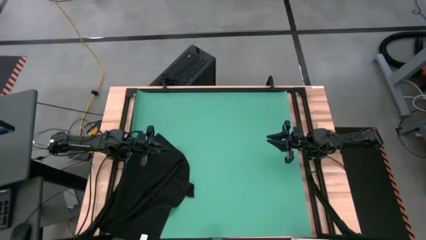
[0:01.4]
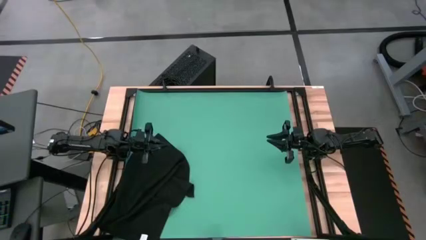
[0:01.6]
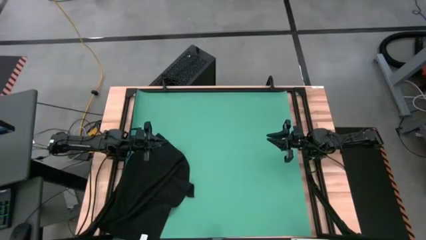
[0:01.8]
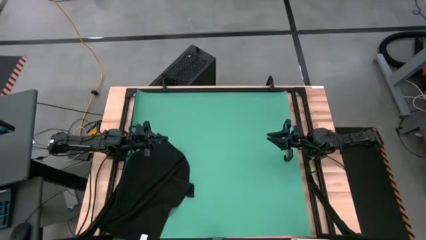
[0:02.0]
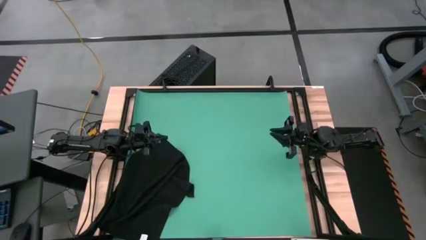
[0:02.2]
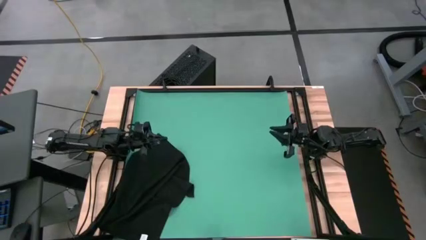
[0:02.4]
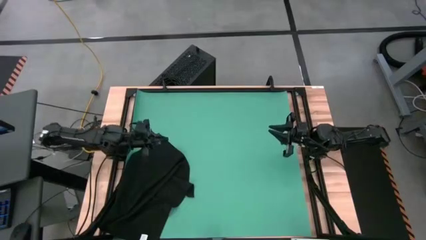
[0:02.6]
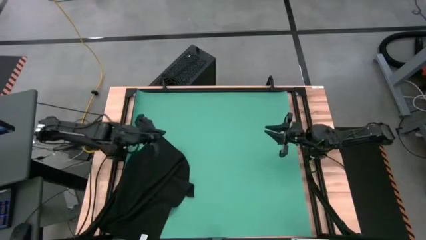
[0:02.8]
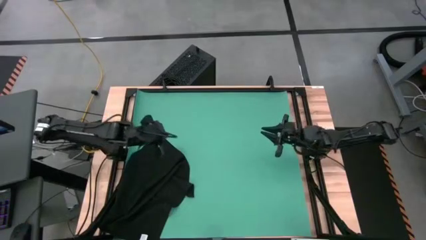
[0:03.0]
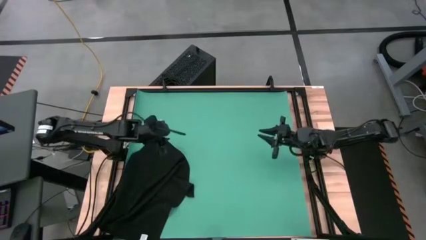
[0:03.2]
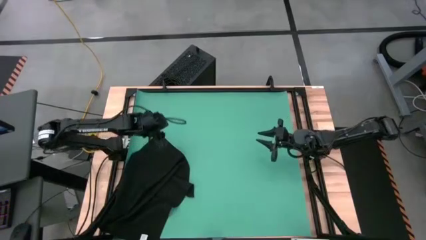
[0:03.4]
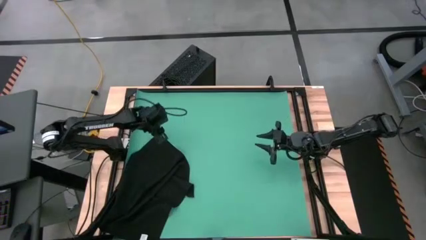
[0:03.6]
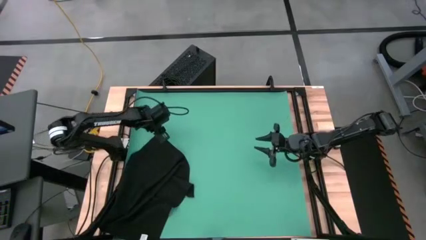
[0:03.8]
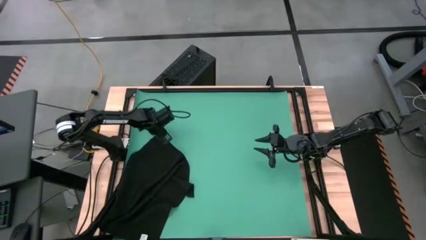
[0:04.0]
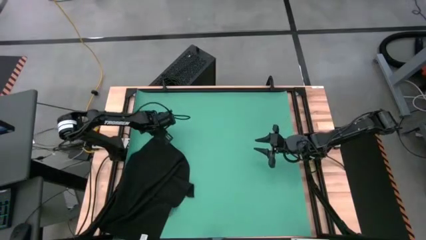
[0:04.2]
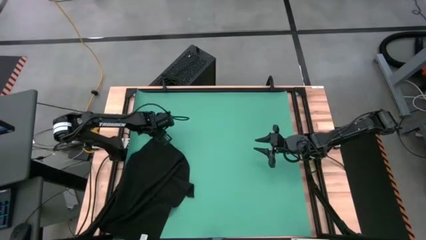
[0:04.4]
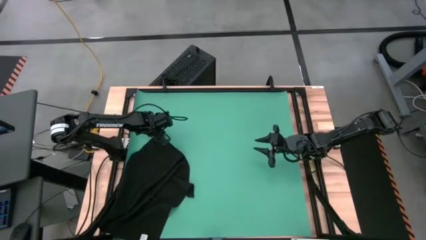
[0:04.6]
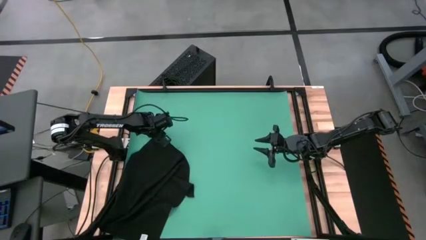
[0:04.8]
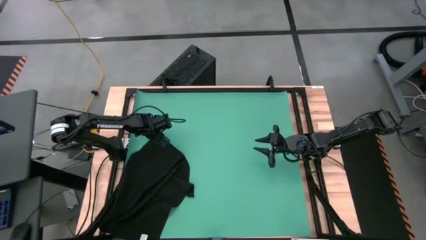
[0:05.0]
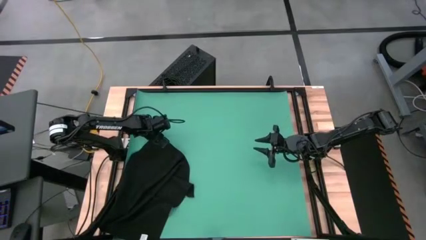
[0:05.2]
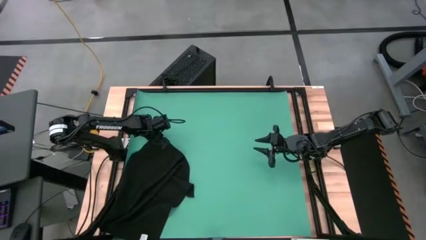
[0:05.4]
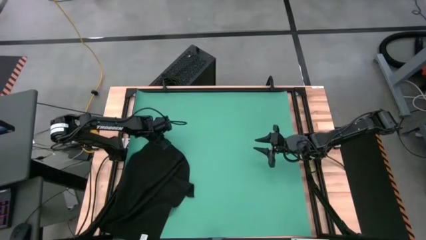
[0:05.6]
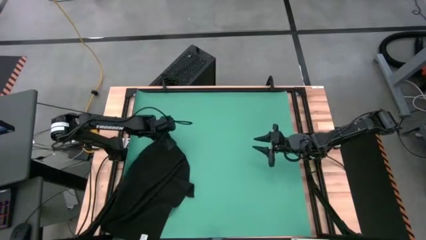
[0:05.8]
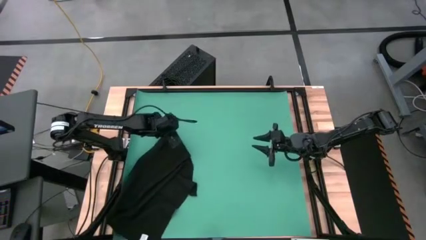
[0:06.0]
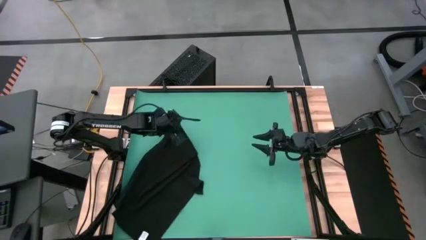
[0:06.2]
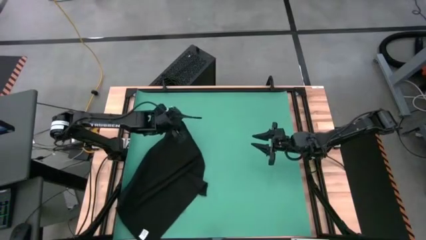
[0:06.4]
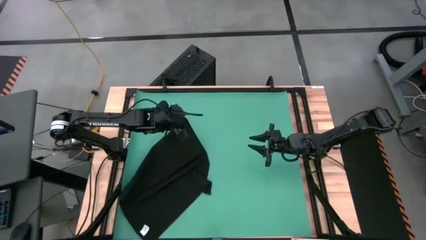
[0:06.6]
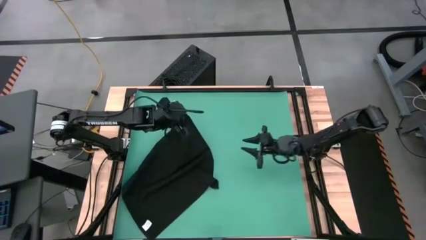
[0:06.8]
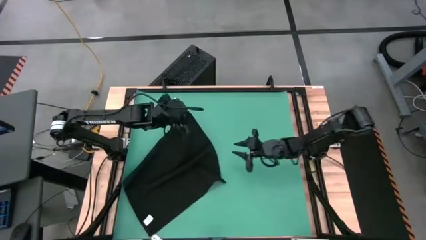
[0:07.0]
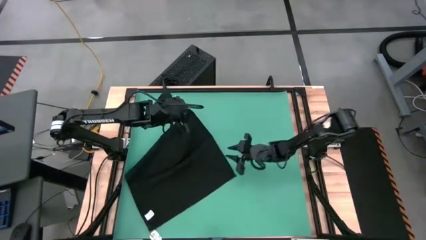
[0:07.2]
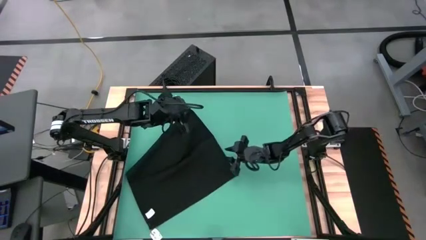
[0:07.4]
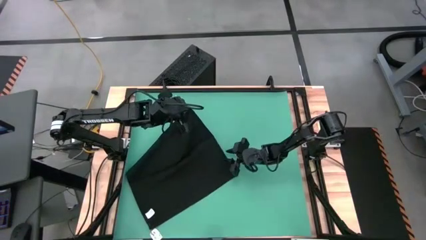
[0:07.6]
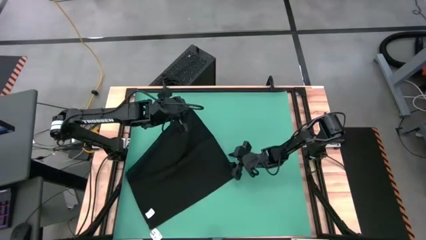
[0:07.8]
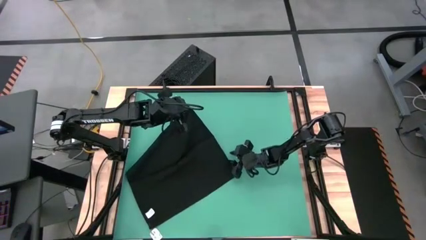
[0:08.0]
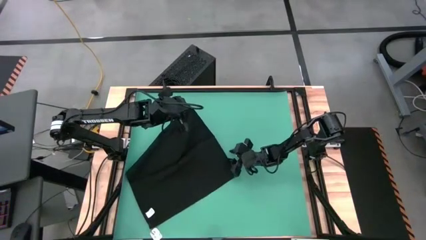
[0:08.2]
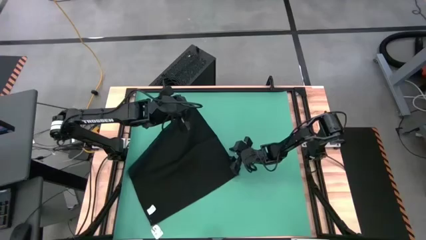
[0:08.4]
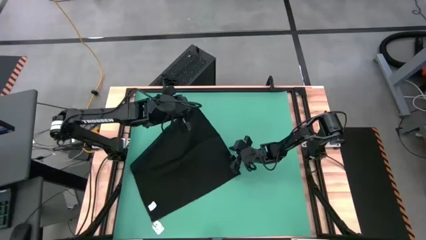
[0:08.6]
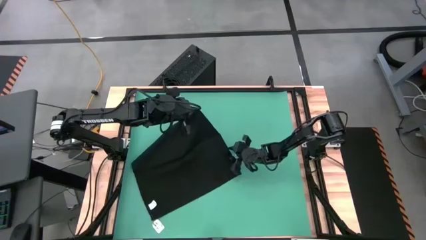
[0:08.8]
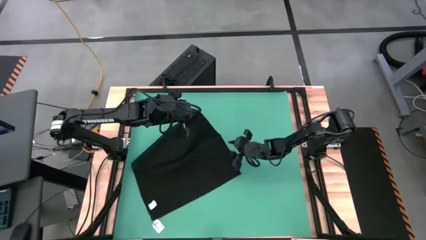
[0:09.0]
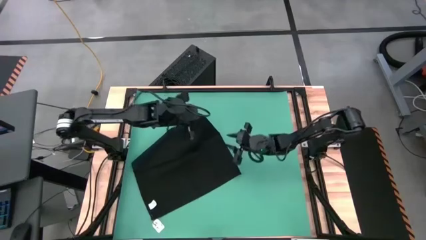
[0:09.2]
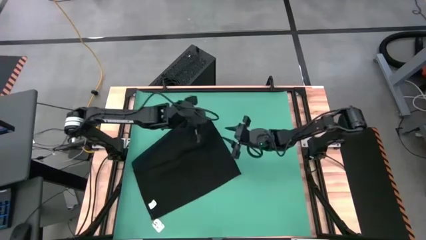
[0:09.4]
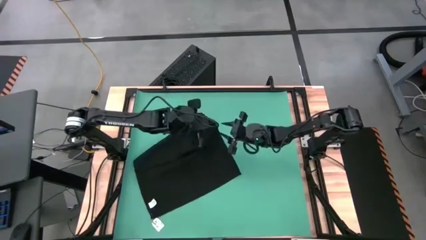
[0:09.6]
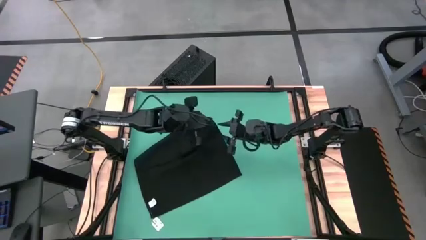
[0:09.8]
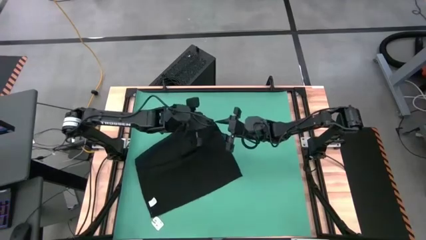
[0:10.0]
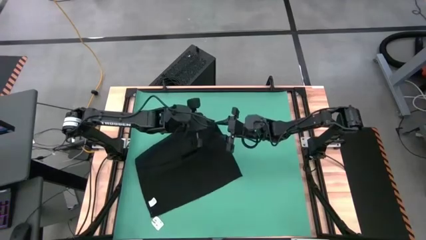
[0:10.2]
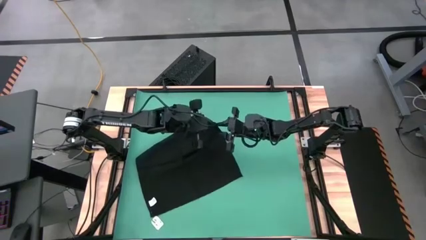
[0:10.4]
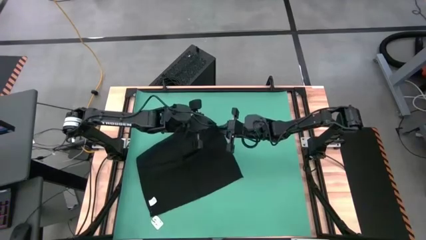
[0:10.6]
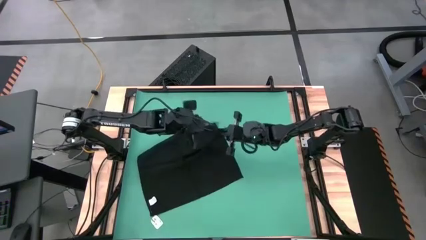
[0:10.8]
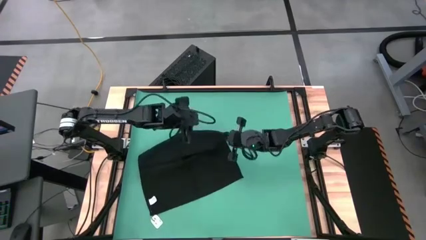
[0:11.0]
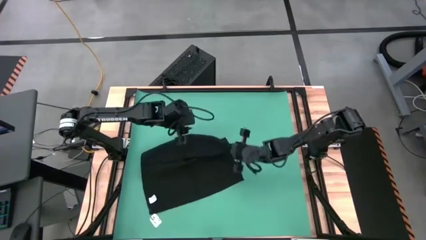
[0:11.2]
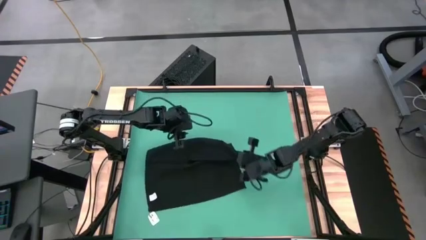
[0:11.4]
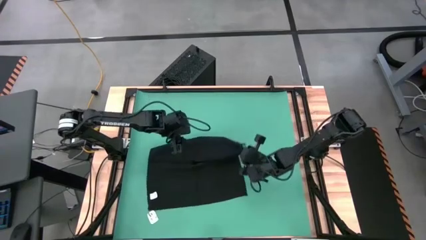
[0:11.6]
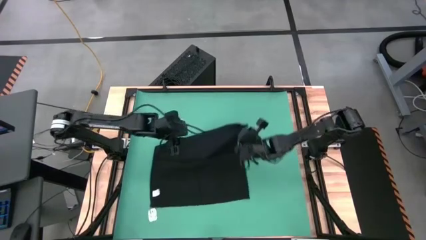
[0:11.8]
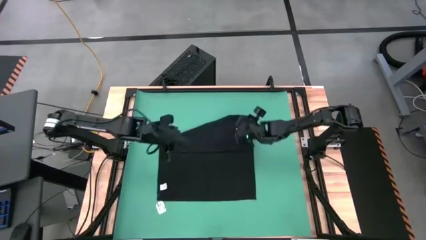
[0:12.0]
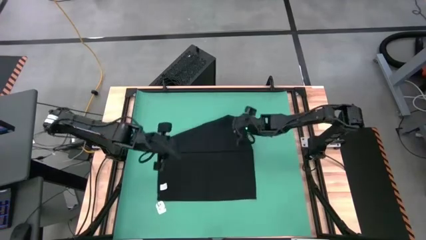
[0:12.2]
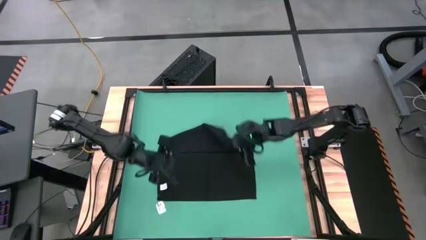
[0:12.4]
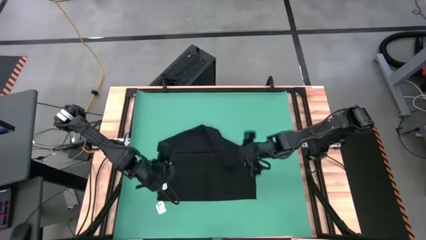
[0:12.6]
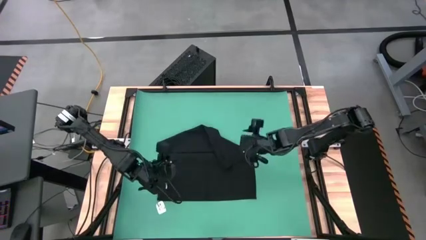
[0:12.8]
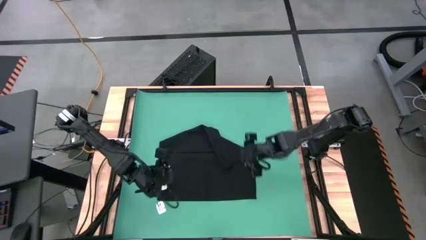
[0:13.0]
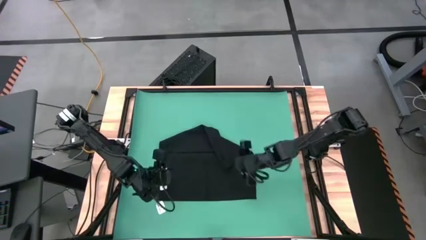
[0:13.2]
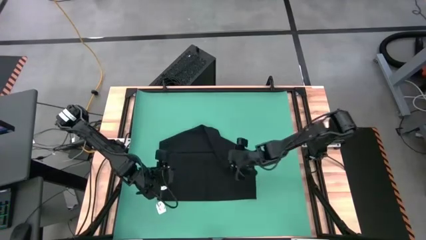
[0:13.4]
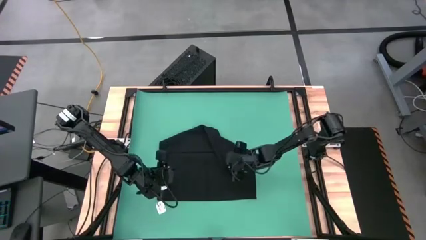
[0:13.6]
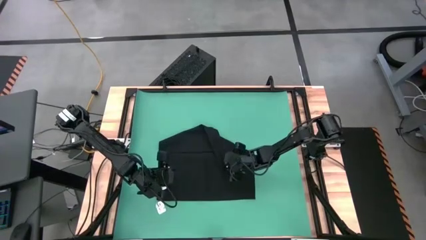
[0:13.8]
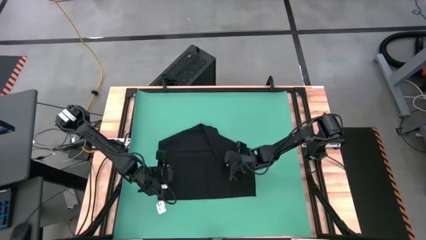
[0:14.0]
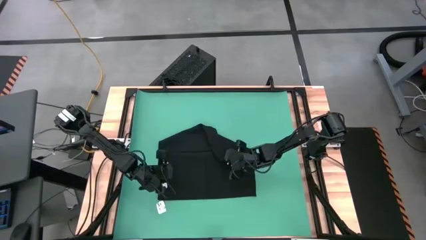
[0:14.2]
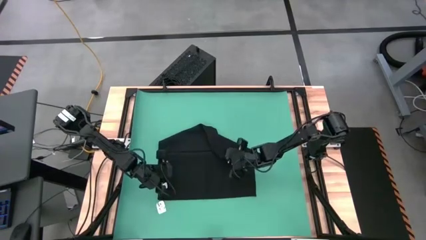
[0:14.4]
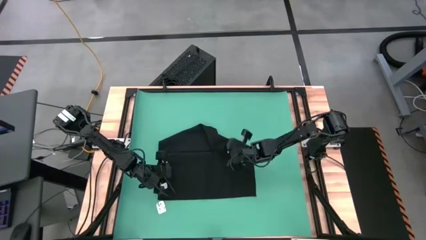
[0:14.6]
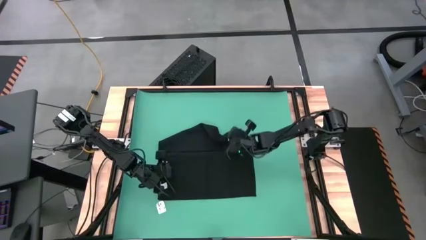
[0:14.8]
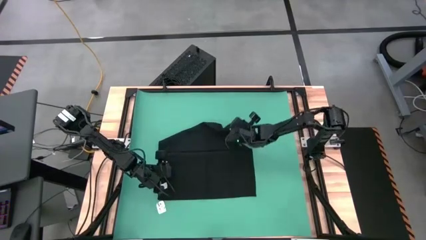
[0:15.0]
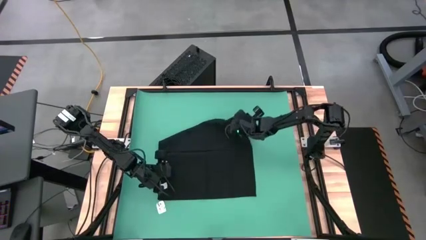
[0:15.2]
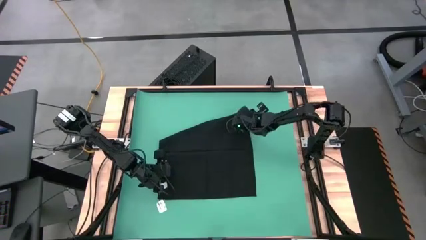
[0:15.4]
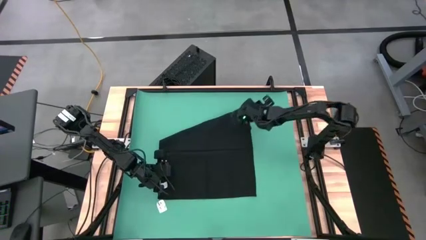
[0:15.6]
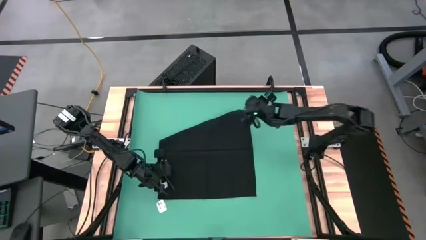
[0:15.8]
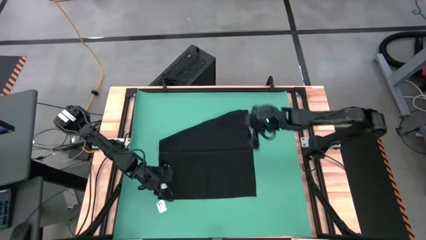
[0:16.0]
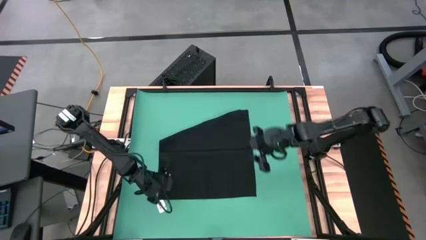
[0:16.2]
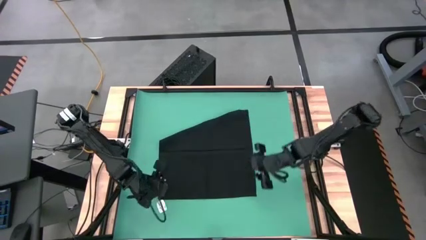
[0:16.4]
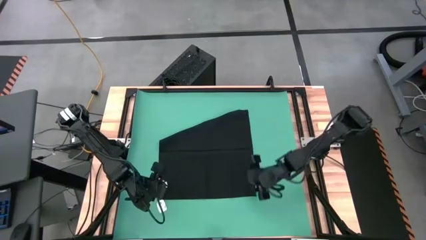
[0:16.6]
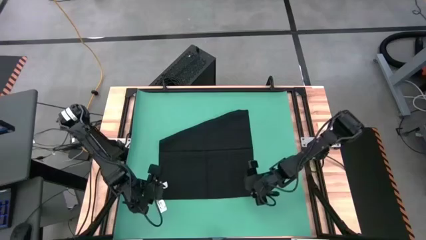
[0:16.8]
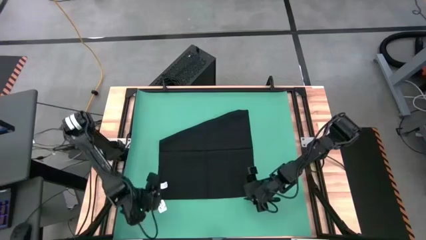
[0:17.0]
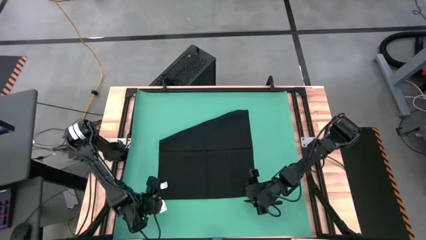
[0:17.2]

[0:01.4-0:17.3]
Task: Roll towel
Fold the brown towel
